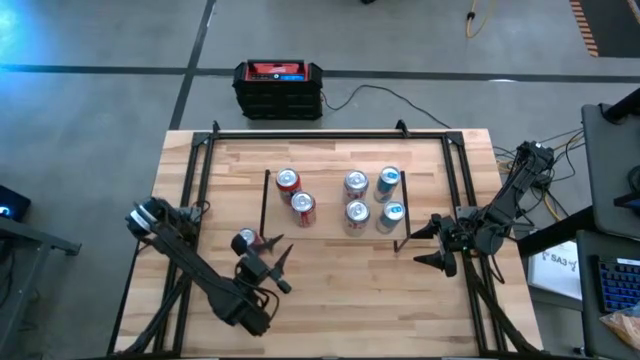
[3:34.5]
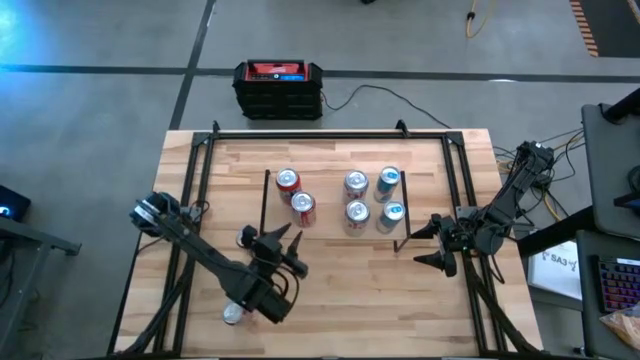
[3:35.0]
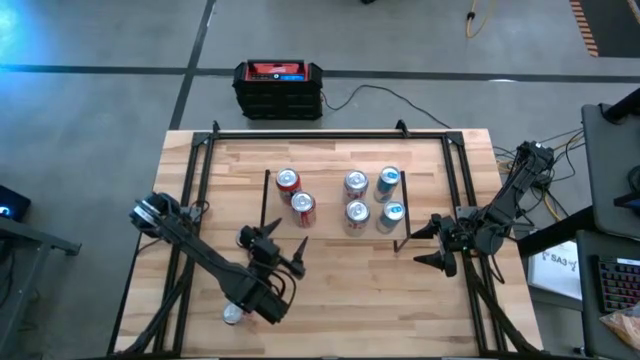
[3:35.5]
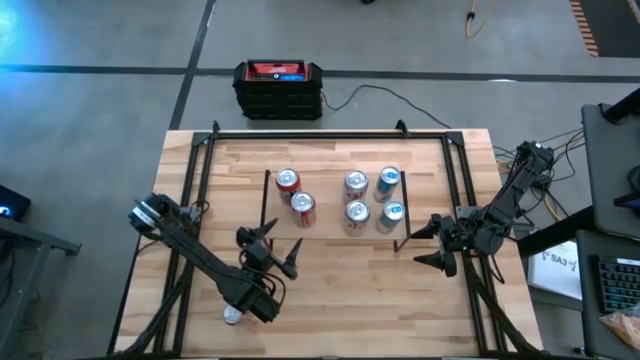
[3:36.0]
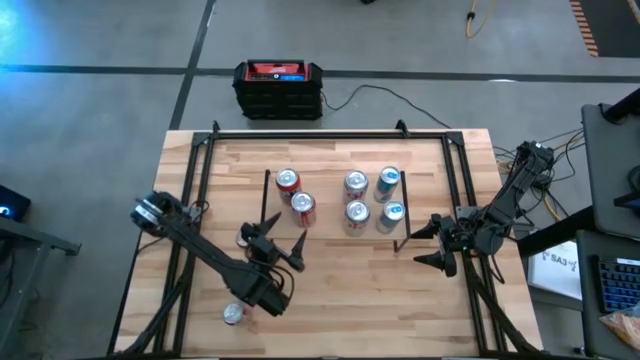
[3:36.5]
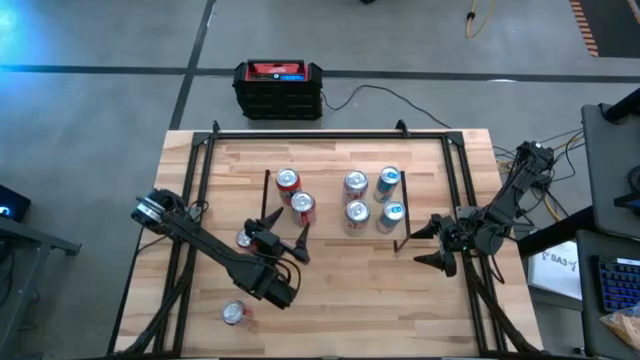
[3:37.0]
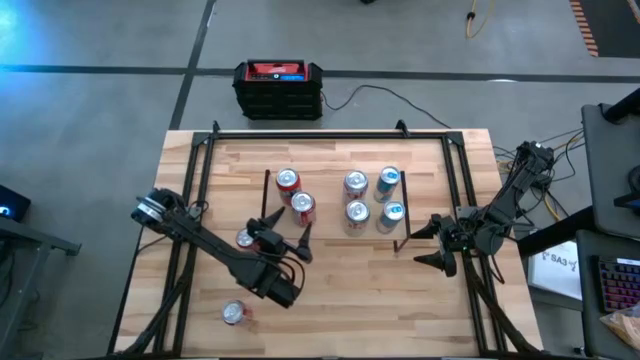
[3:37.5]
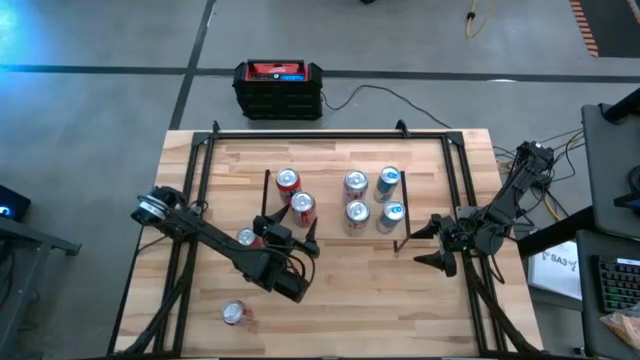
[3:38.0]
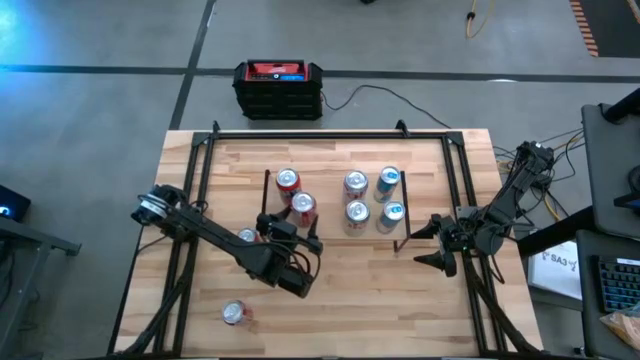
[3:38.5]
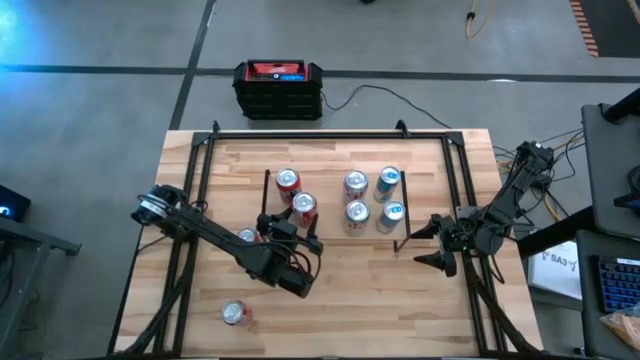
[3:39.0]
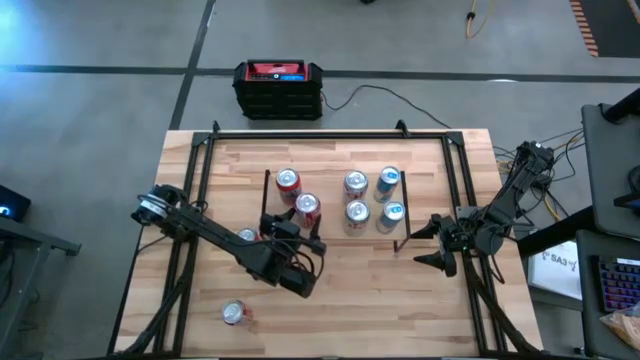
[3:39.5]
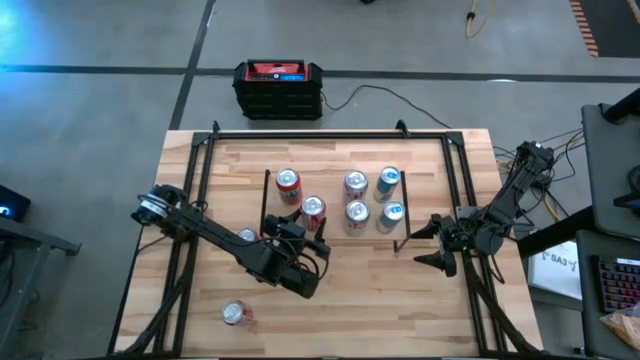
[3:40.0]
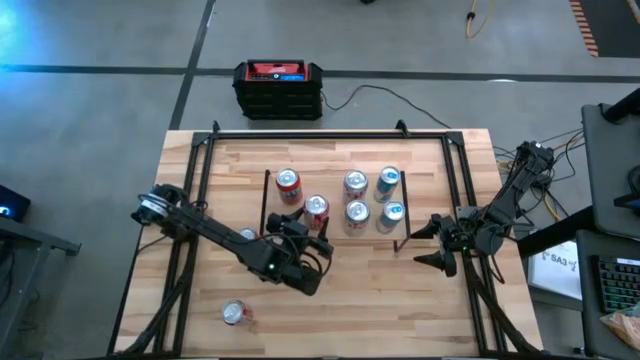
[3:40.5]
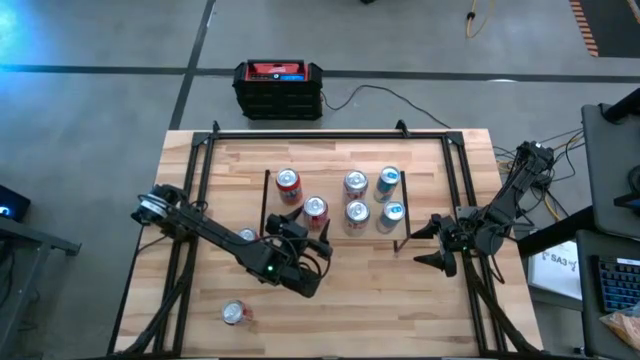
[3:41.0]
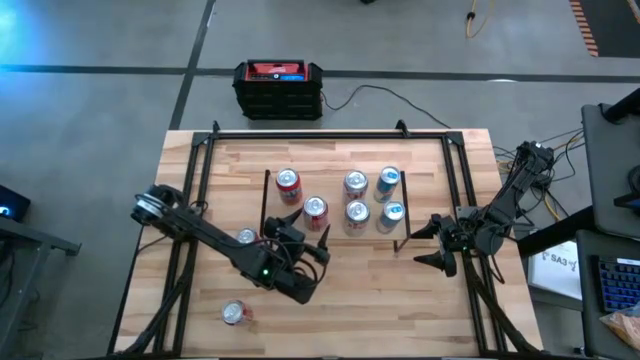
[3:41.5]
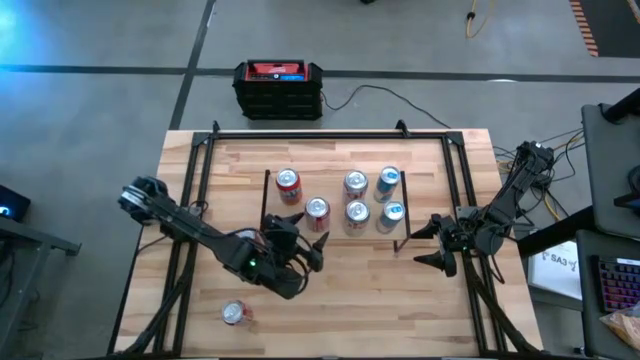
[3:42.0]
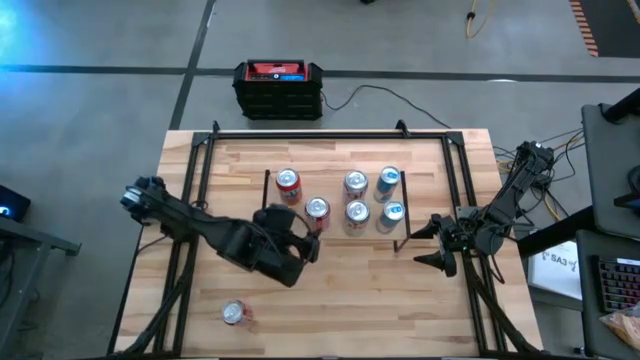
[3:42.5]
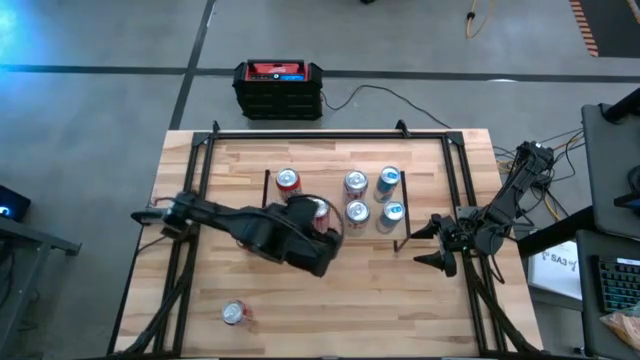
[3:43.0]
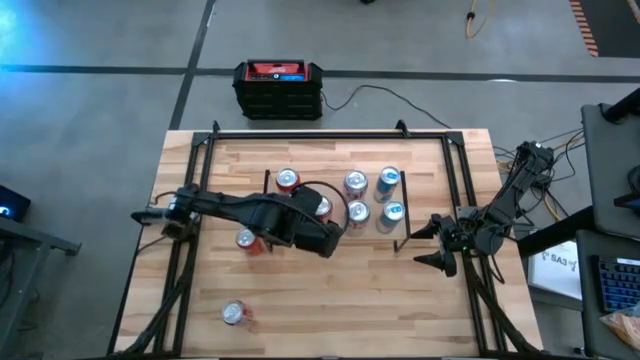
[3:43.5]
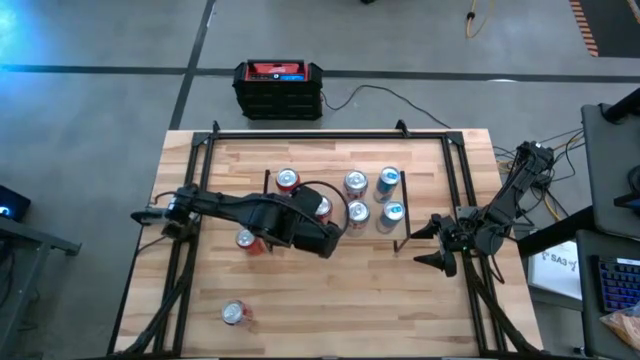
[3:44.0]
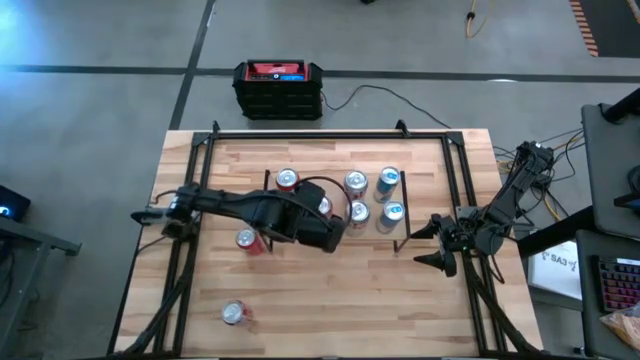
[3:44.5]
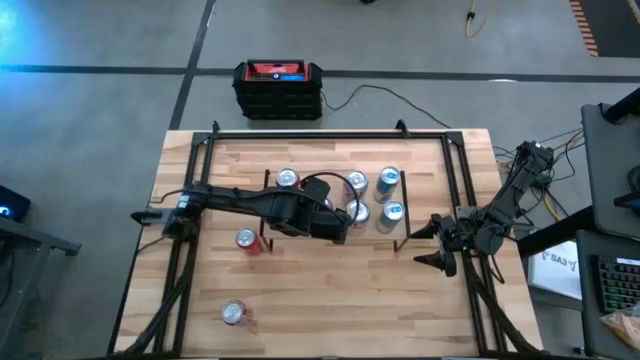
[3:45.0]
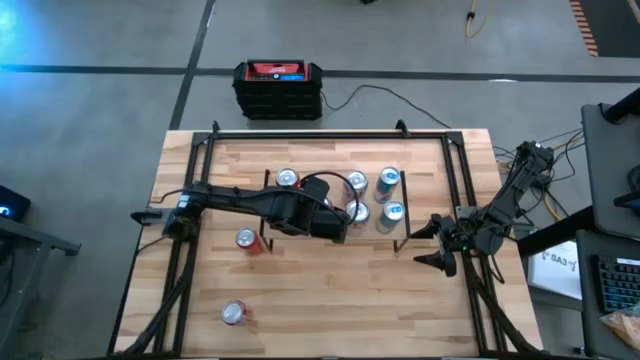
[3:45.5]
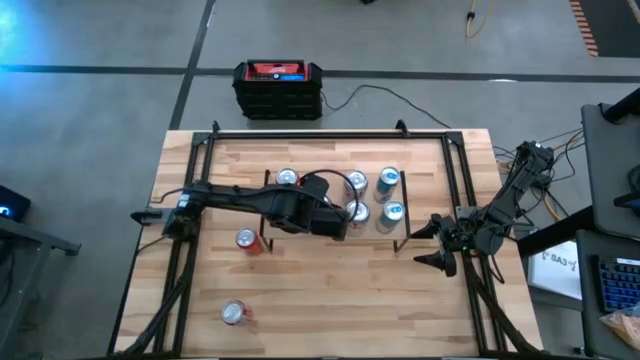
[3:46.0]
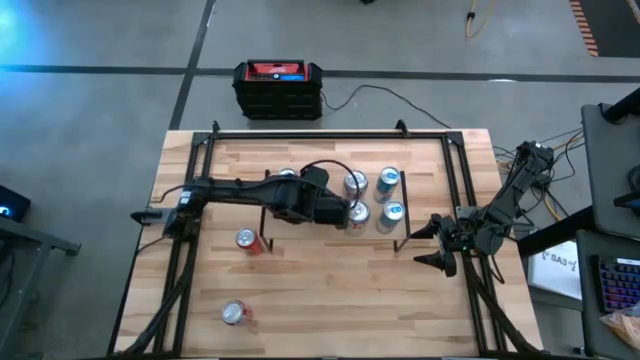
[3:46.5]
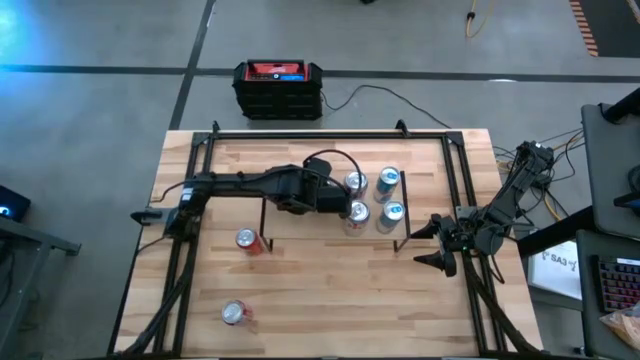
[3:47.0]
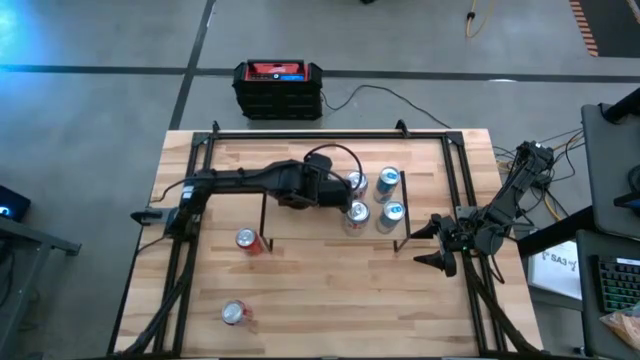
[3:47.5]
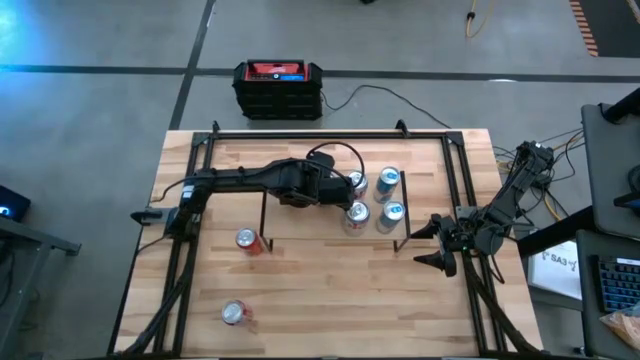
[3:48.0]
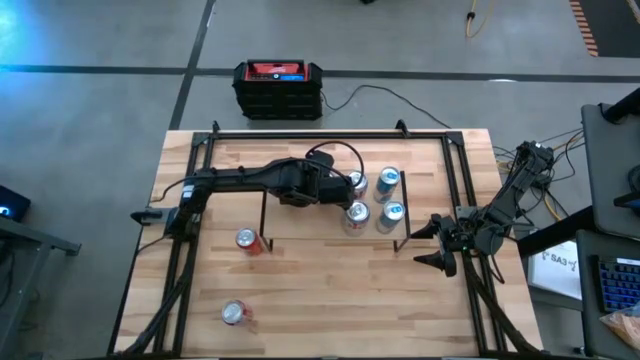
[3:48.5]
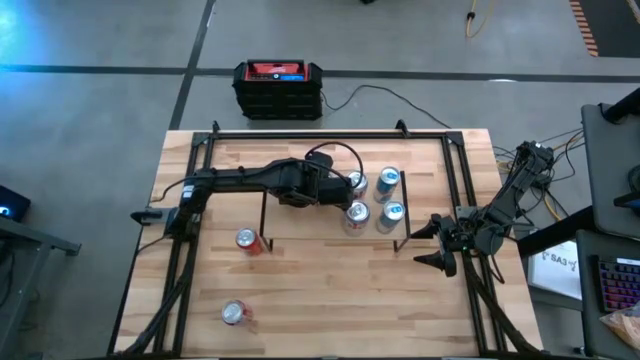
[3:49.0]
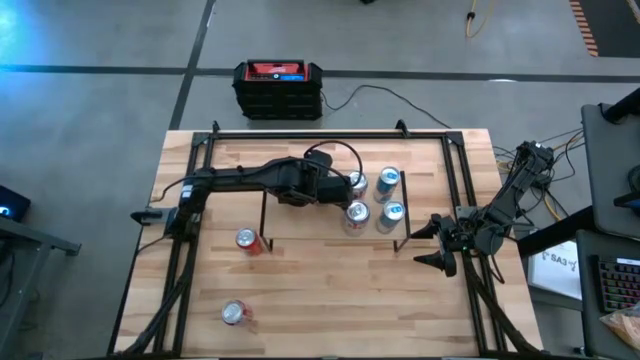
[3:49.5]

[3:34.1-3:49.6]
Task: Place canned beverage on shelf
Put the top red white soda can on the shelf

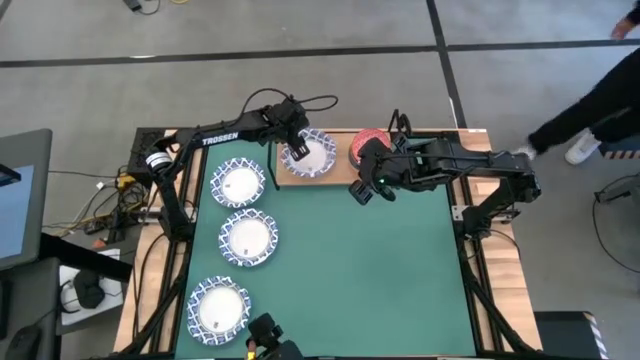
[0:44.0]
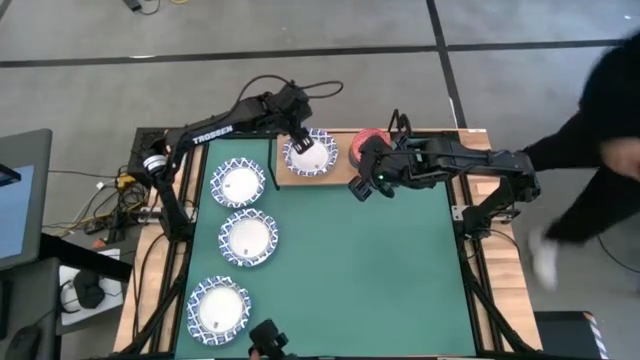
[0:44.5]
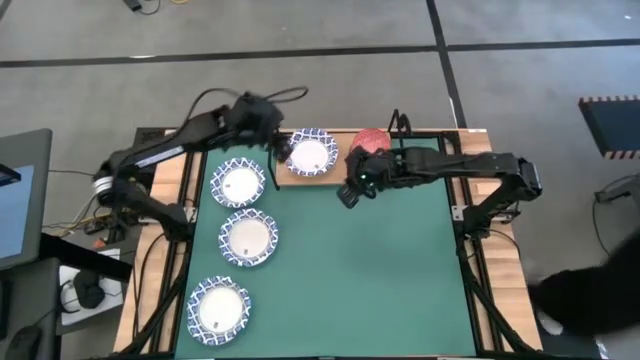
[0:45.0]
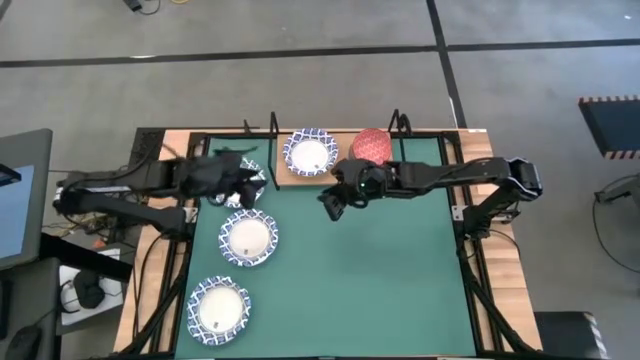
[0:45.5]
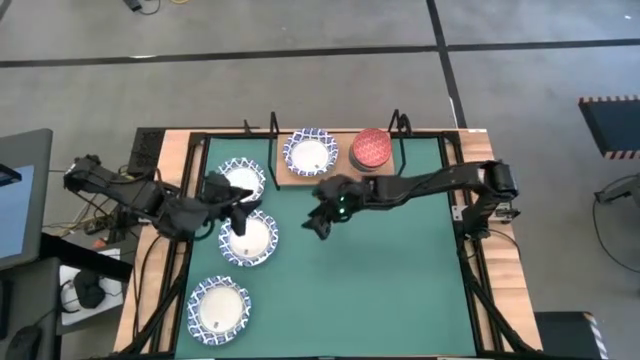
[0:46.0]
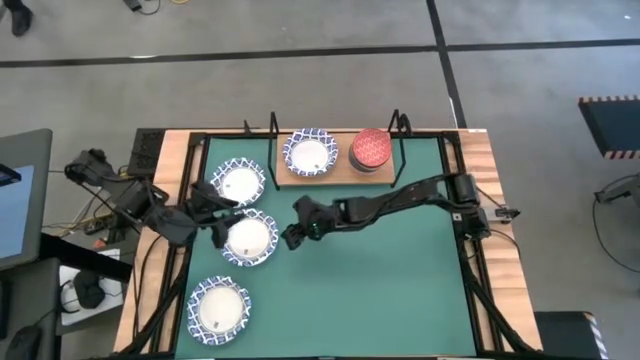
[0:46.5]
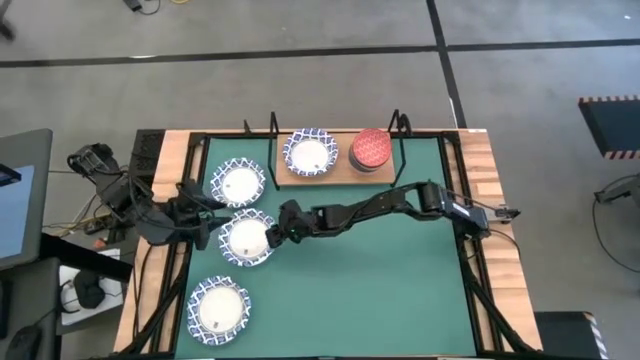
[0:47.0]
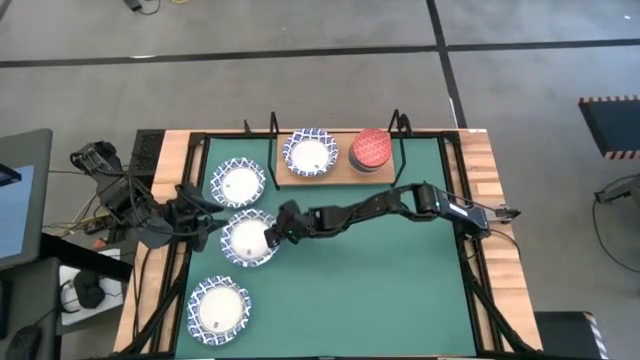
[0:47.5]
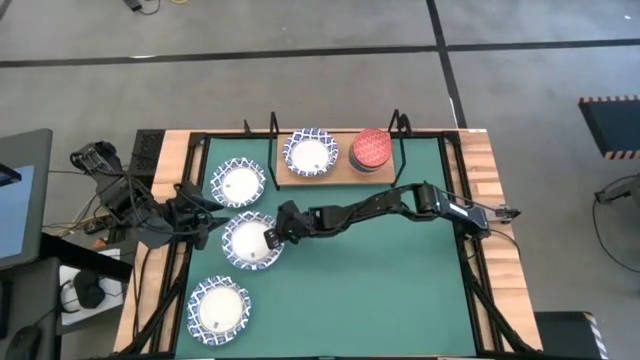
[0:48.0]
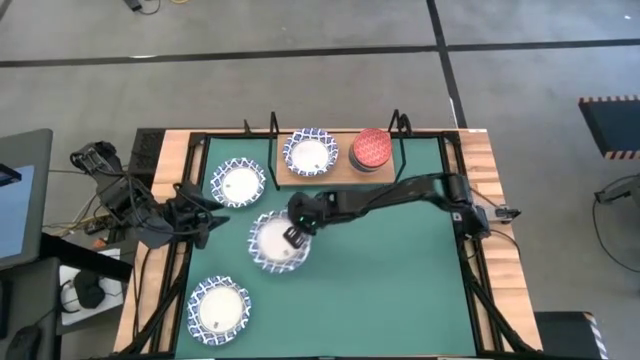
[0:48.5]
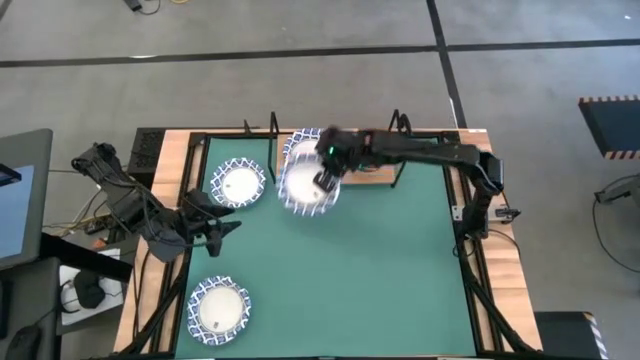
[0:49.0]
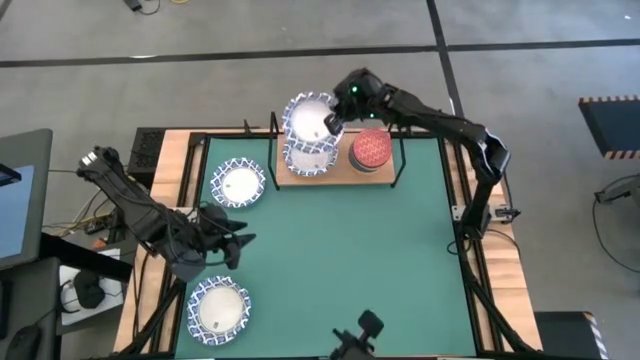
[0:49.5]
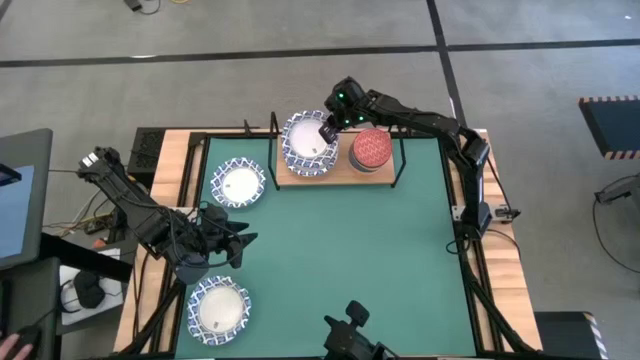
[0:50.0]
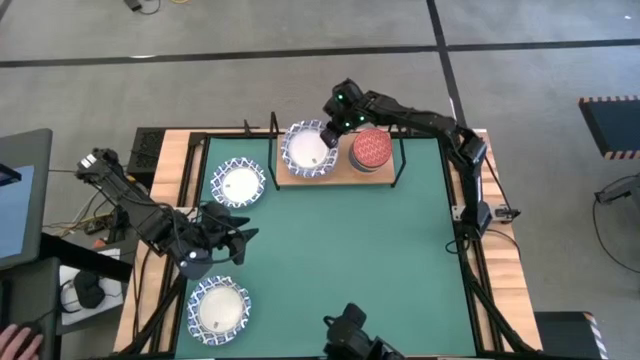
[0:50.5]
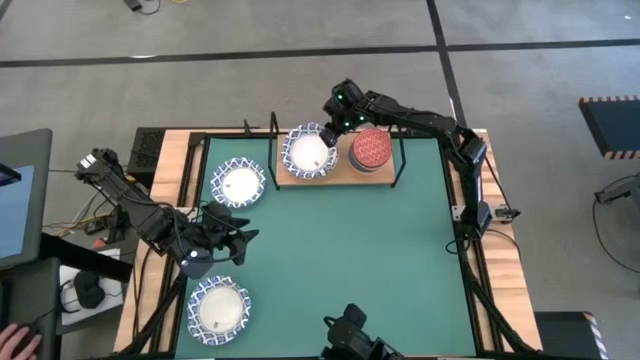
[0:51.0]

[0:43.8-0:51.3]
Task: Place and stack bowls onto a shelf
Stack the middle white and blue paper bowl on top of the white and blue paper bowl on the shelf
